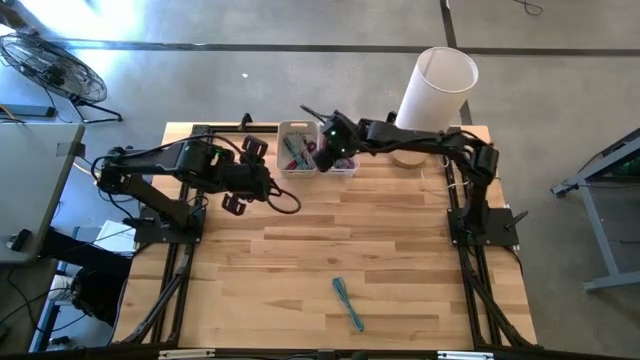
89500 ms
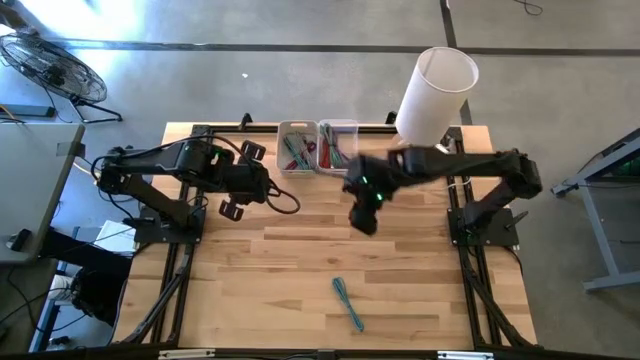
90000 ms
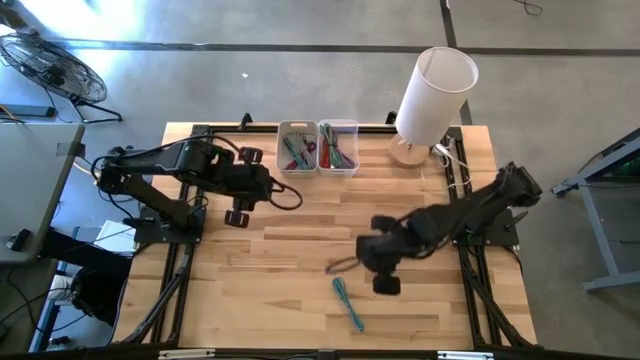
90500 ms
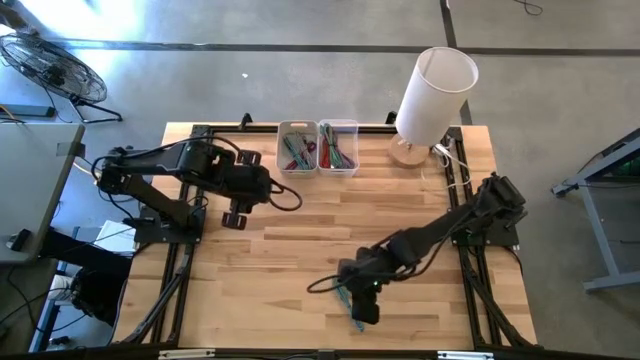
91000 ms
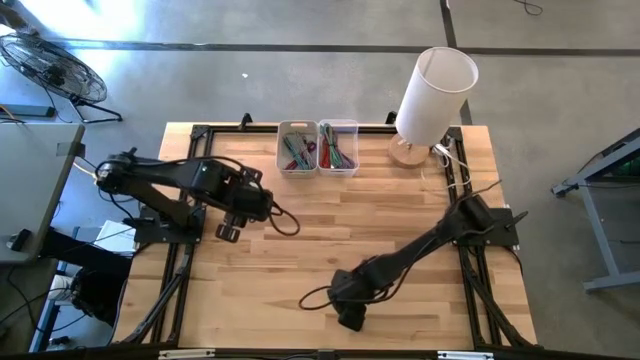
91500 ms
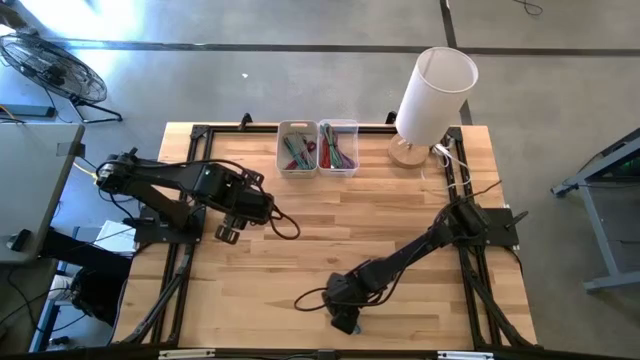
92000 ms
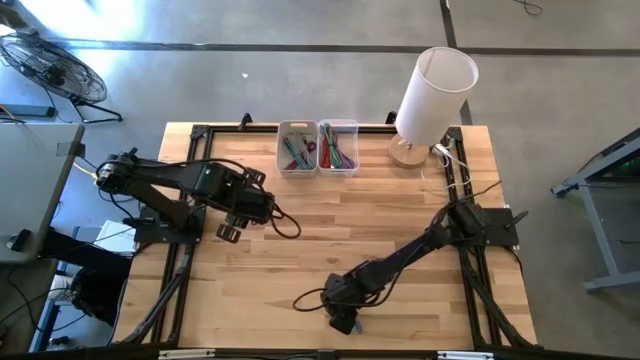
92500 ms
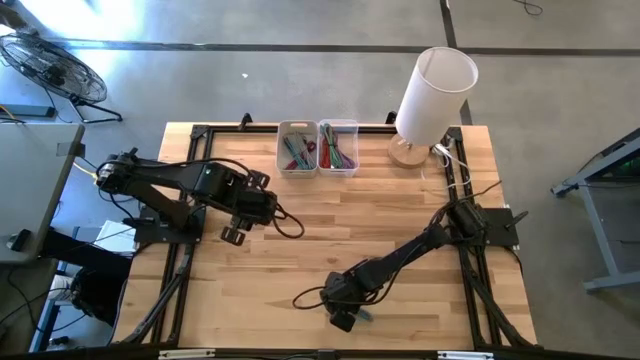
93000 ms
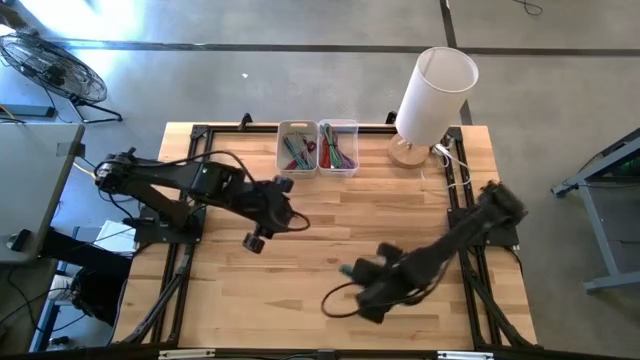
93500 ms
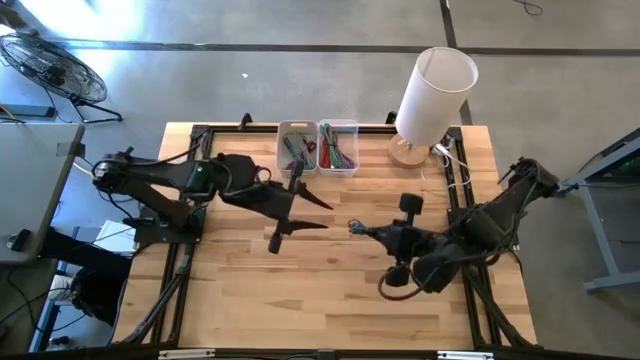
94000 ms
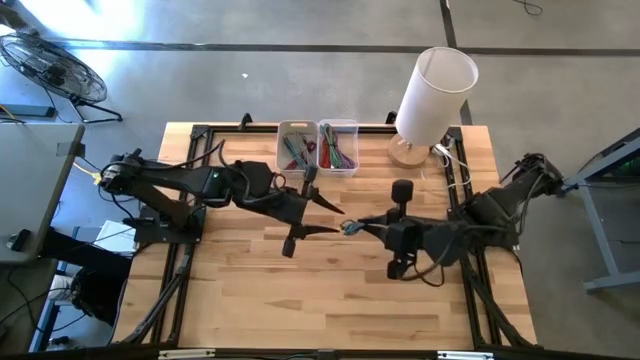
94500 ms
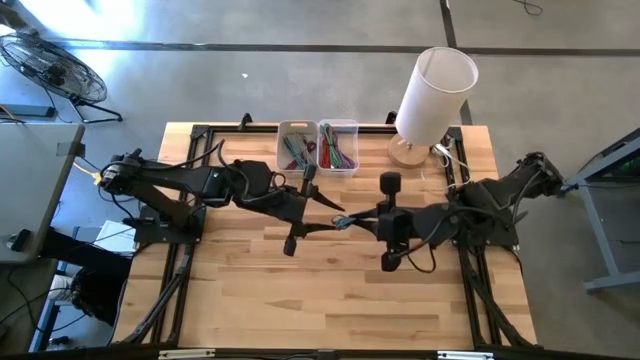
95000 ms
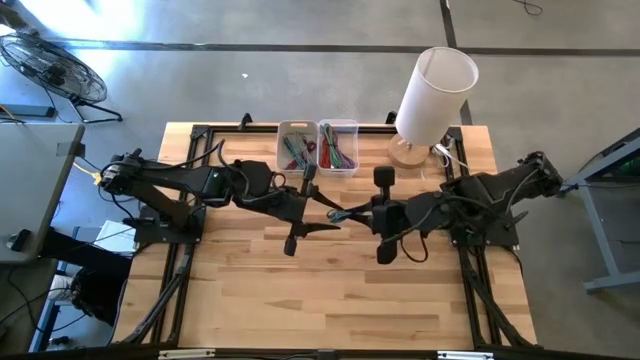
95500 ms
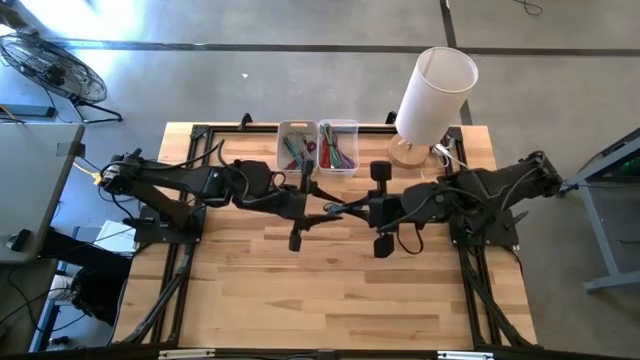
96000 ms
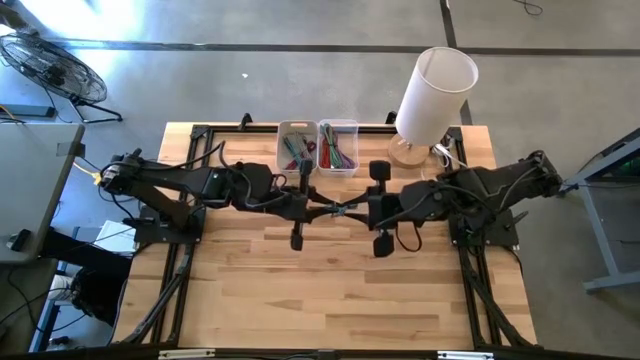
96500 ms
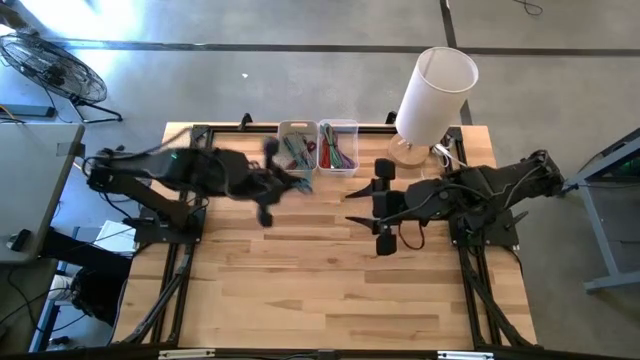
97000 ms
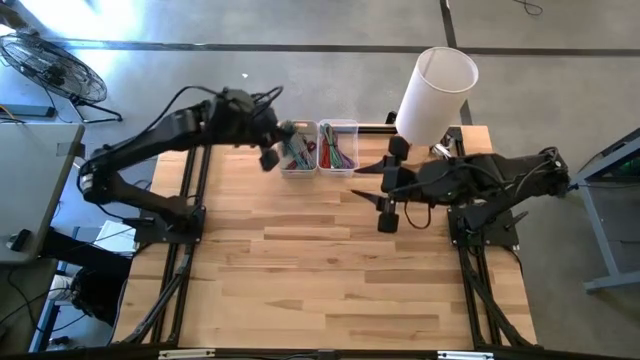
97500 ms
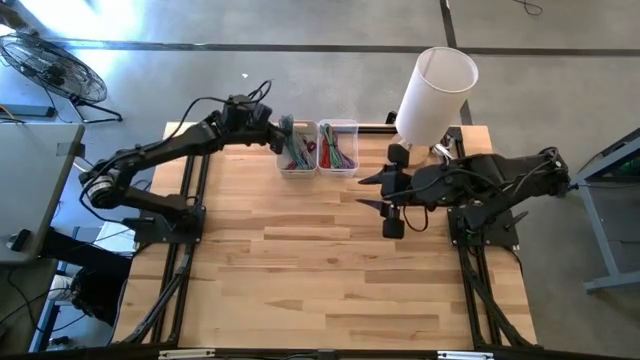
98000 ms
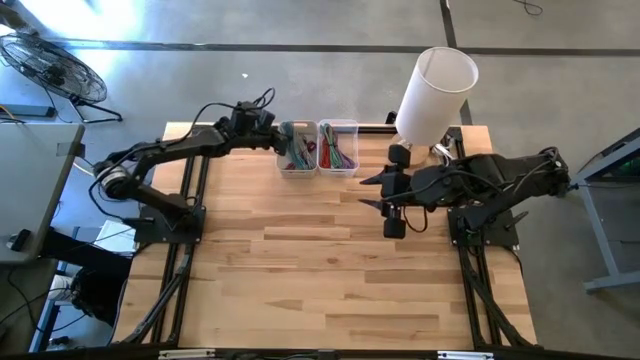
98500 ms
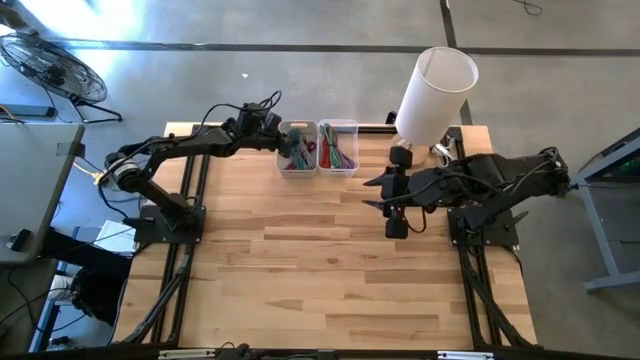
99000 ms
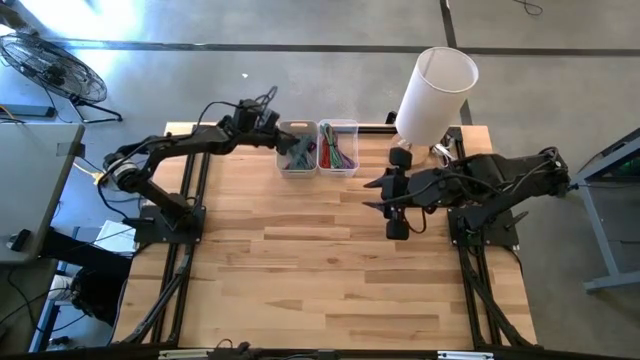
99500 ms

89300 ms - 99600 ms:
Task: Pick & Place USB Port
Put the blue and black USB cable into the gray bin

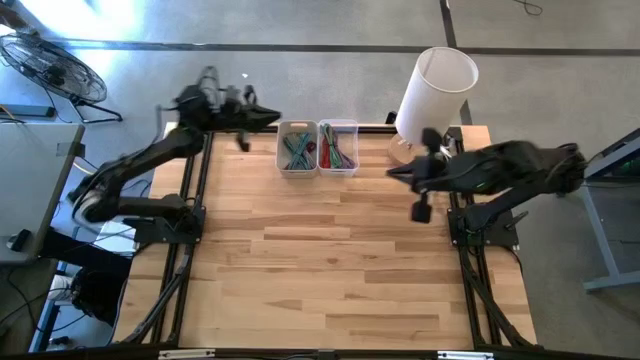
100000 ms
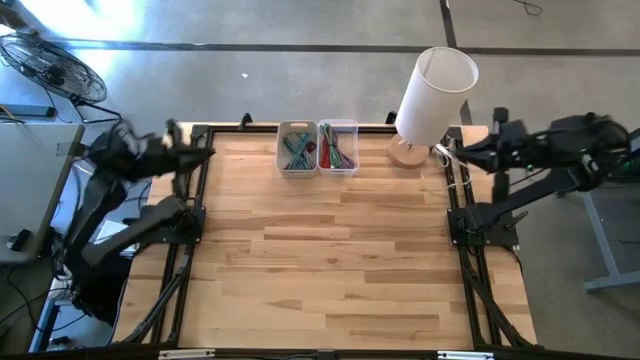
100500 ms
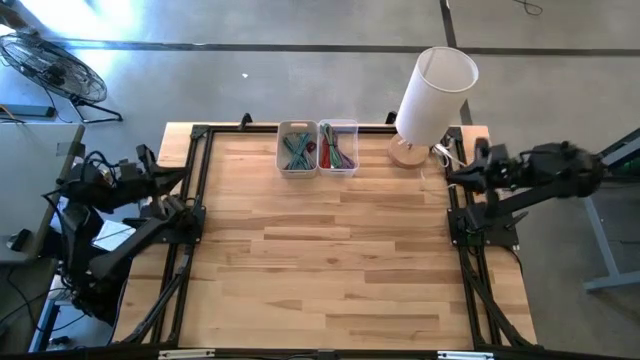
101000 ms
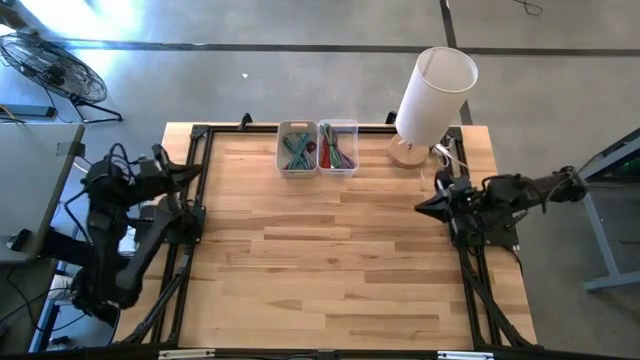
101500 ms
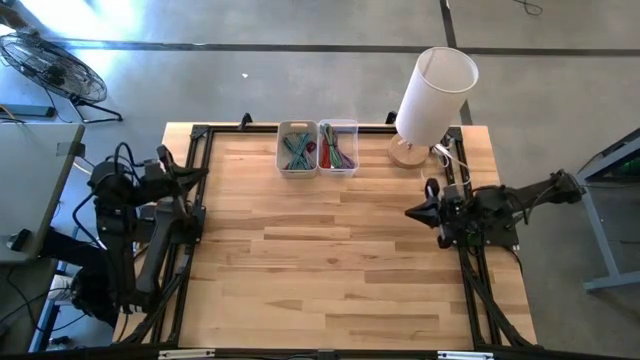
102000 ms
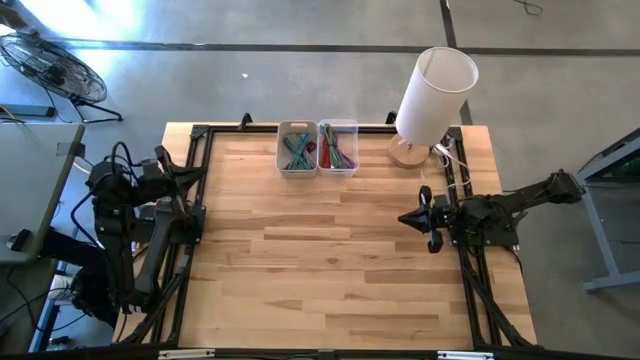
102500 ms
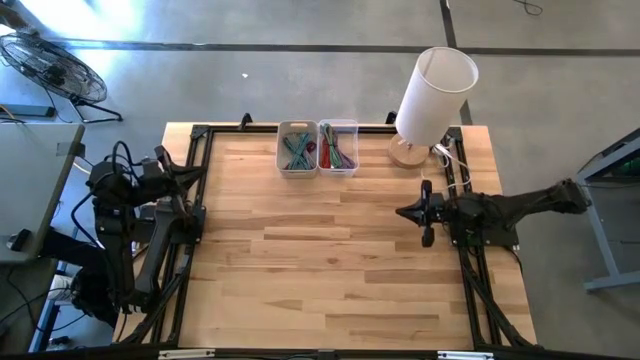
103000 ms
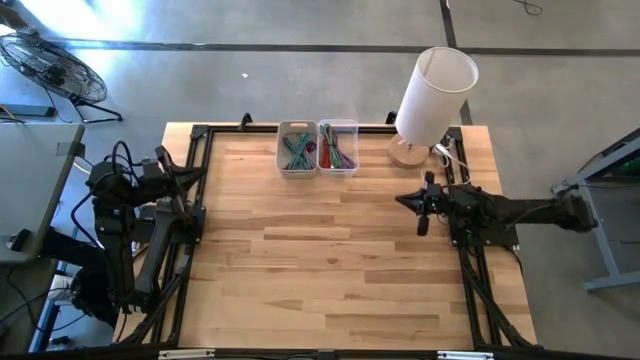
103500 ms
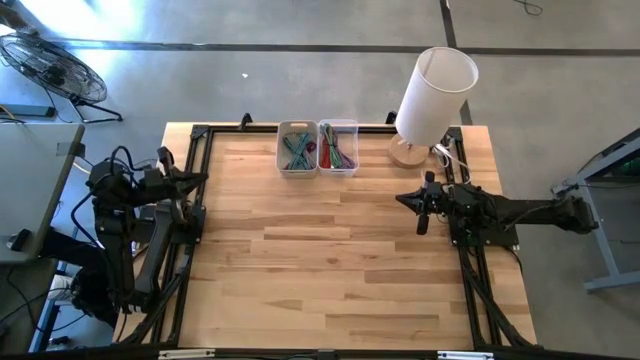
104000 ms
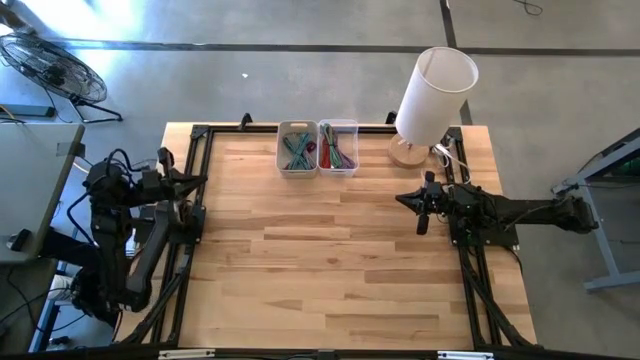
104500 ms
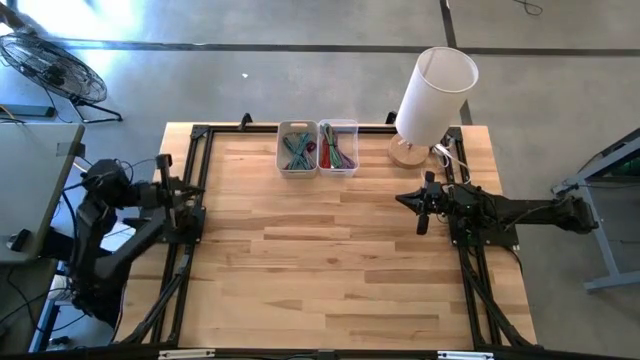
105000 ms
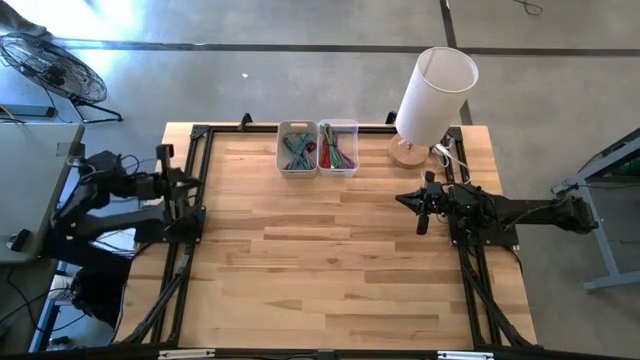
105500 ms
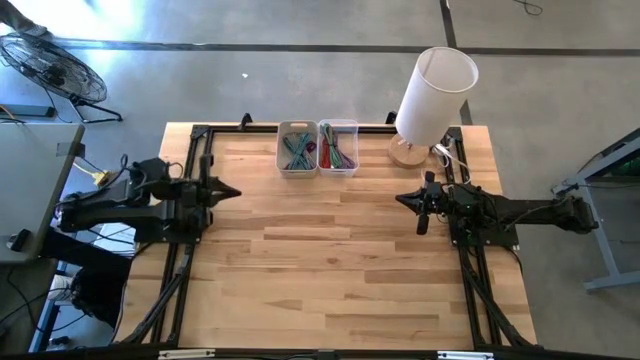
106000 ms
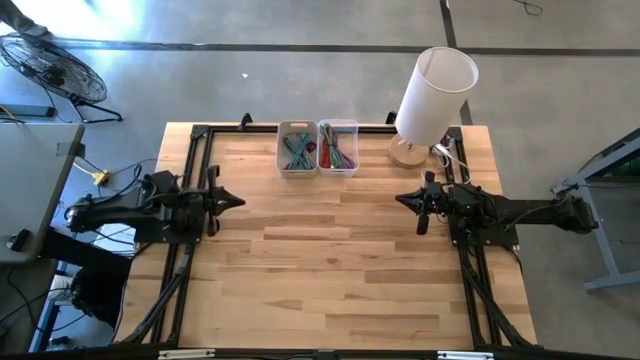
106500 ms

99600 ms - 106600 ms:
Return to Home Position

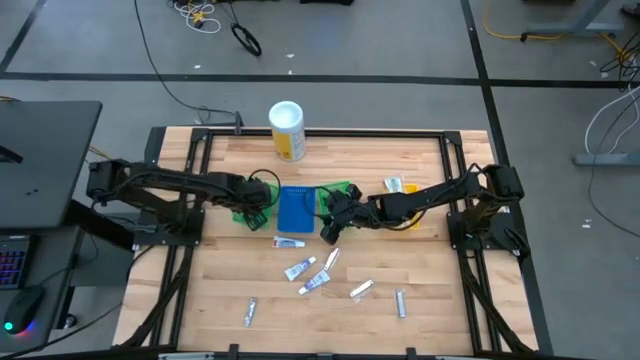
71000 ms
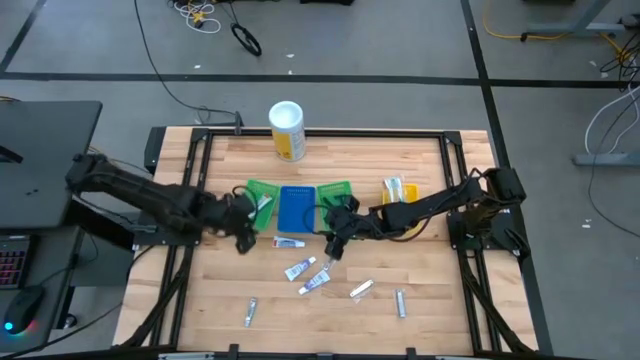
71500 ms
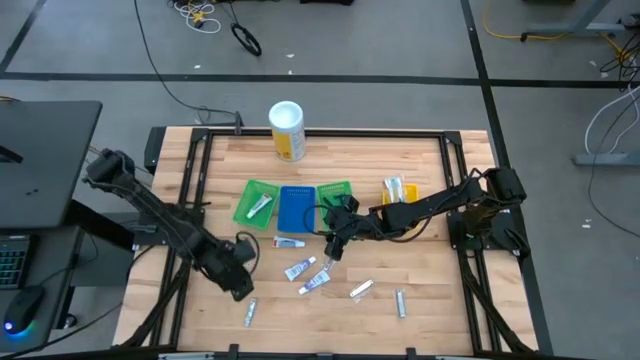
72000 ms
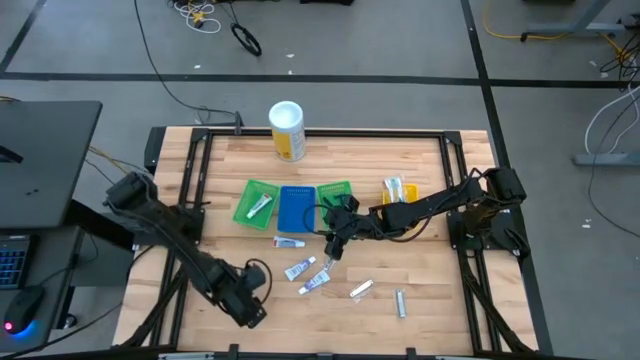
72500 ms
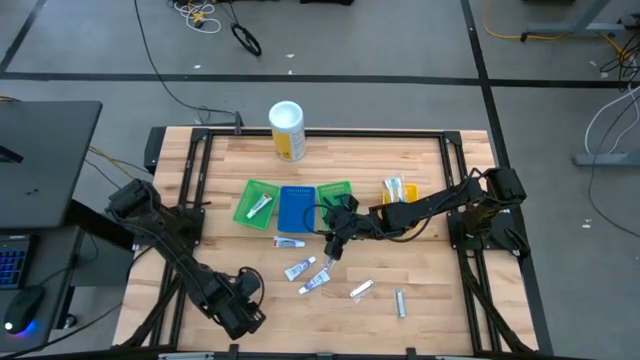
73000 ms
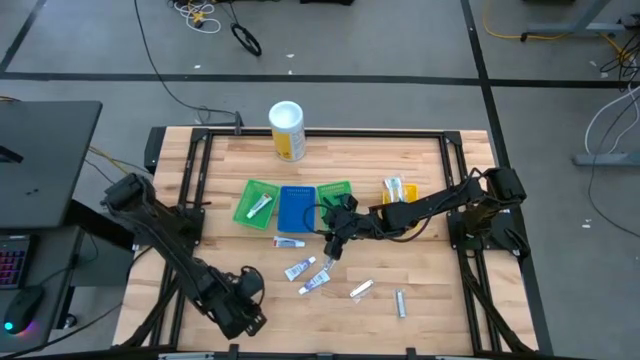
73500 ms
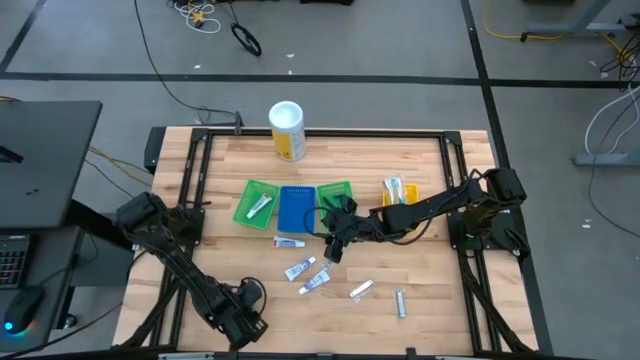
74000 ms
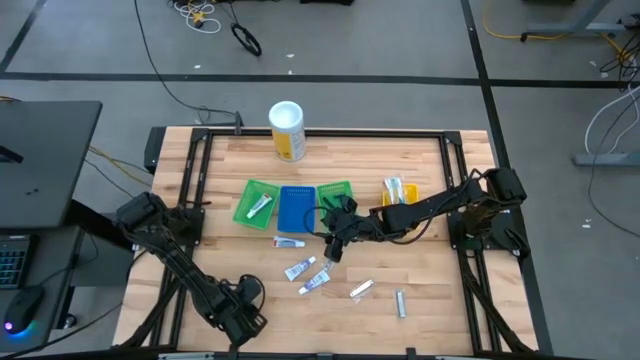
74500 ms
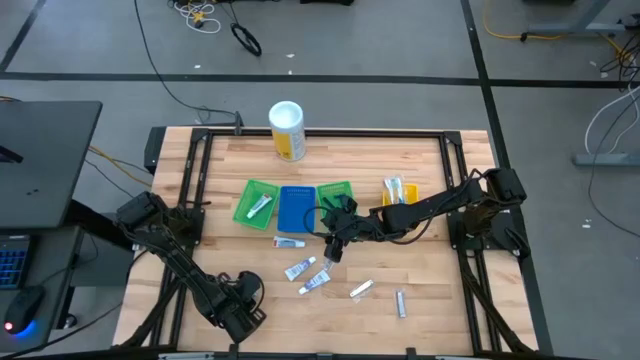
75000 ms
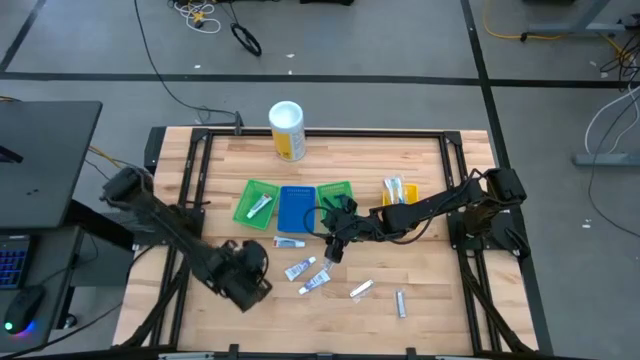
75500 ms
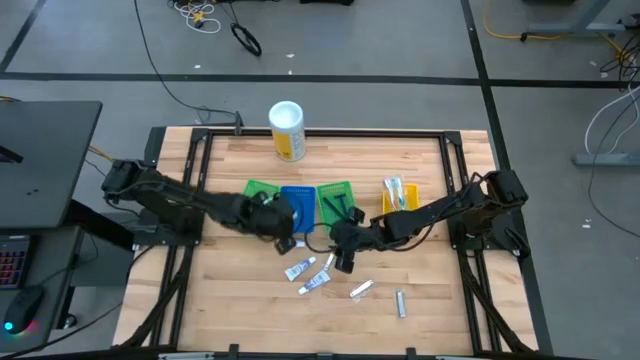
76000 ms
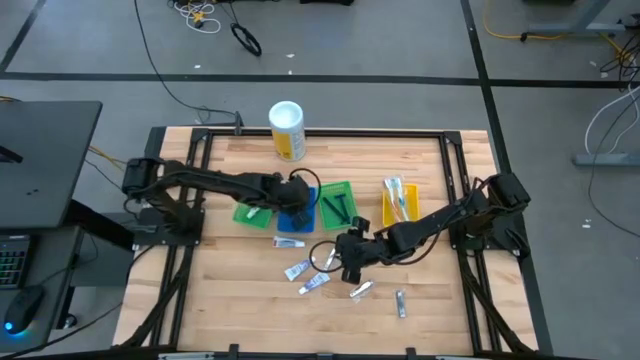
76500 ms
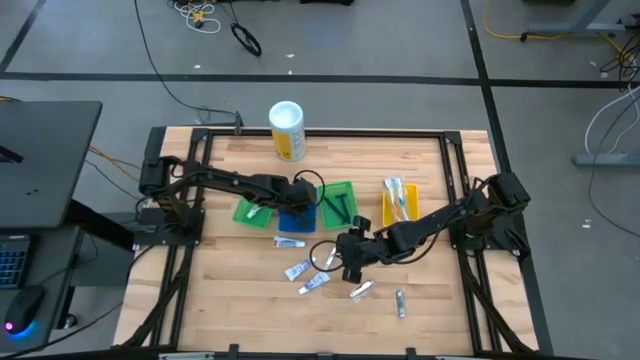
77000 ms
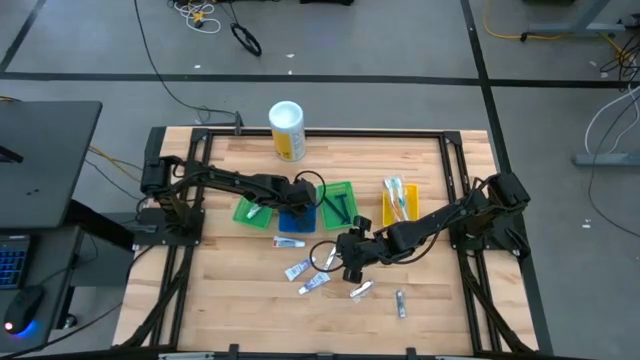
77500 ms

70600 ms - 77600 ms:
Task: Pick & Place Travel size toiletries
Put the silver nail cutter into the blue bin
